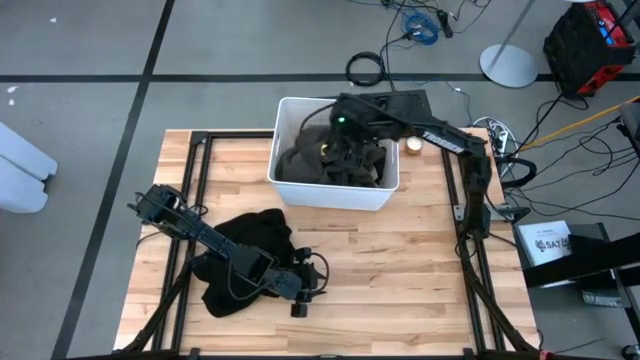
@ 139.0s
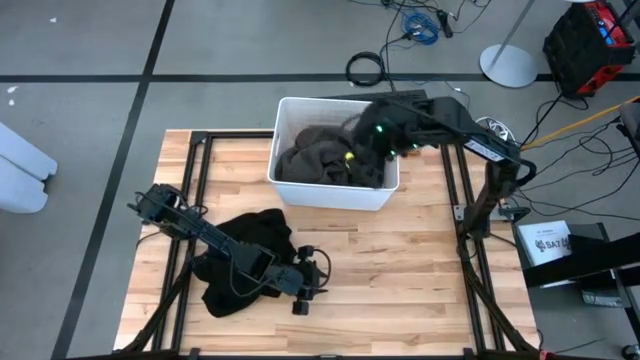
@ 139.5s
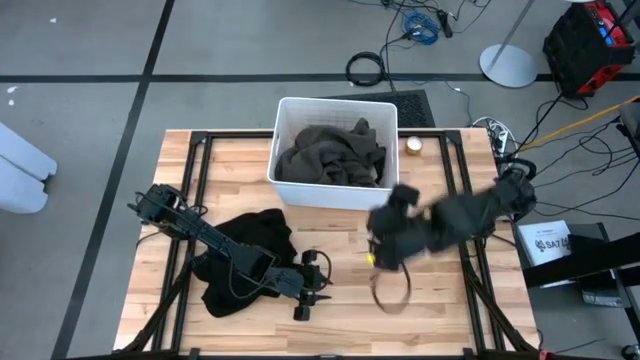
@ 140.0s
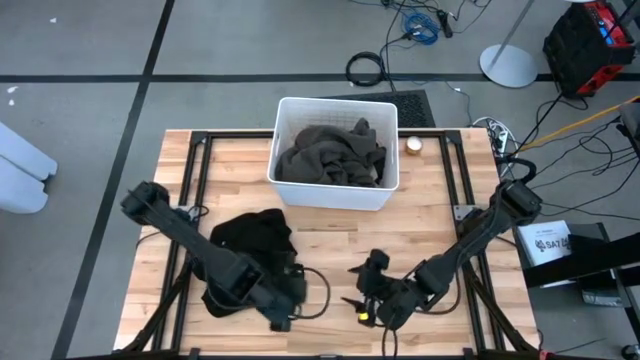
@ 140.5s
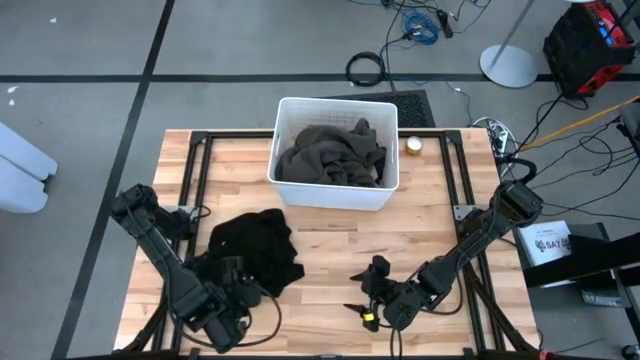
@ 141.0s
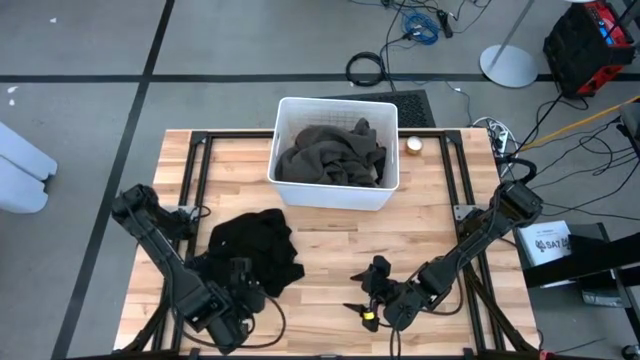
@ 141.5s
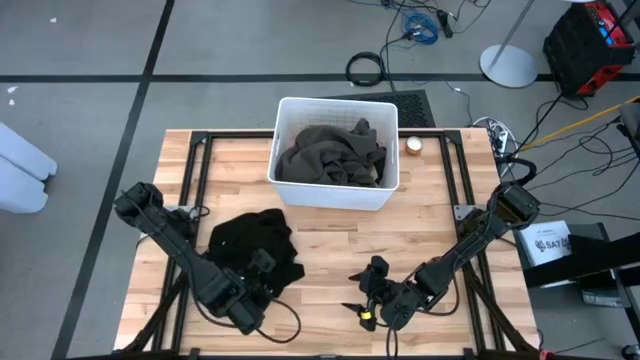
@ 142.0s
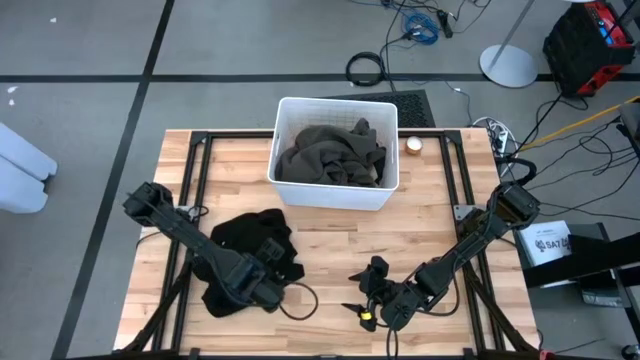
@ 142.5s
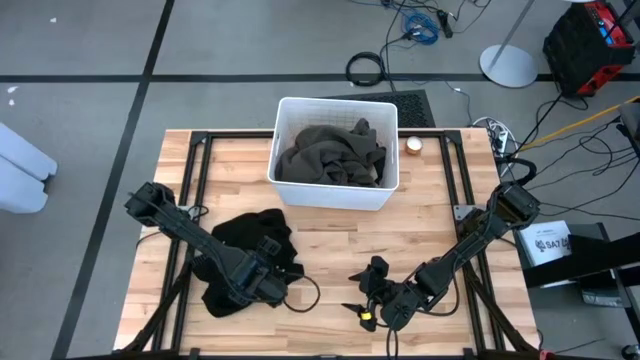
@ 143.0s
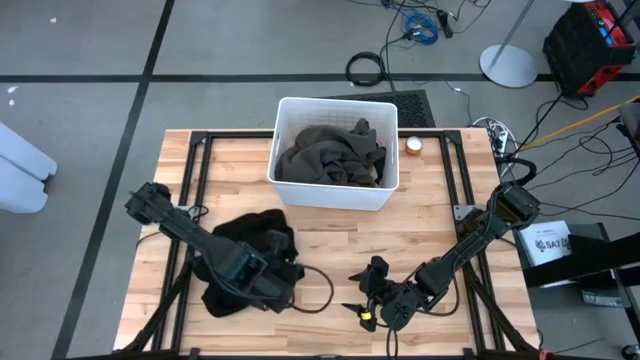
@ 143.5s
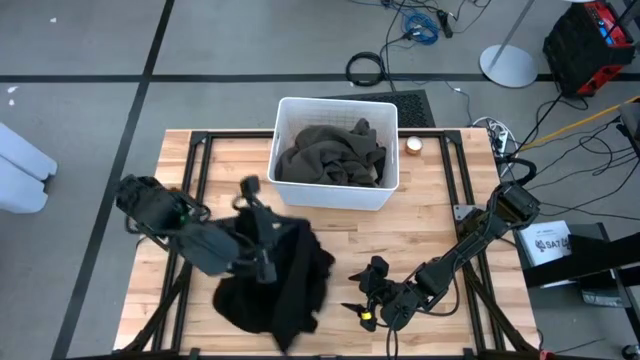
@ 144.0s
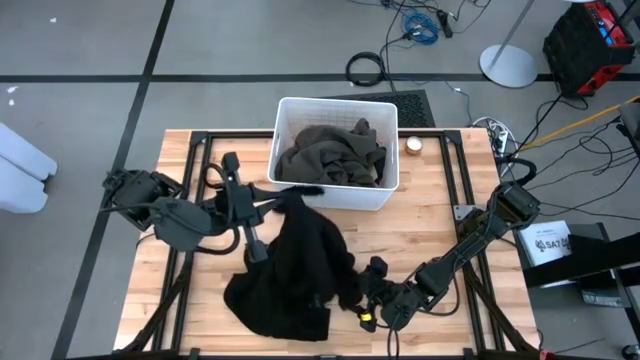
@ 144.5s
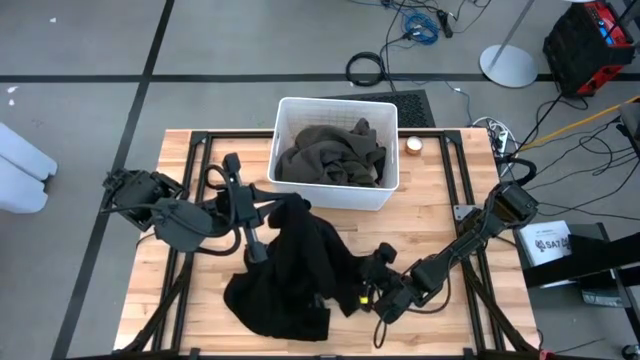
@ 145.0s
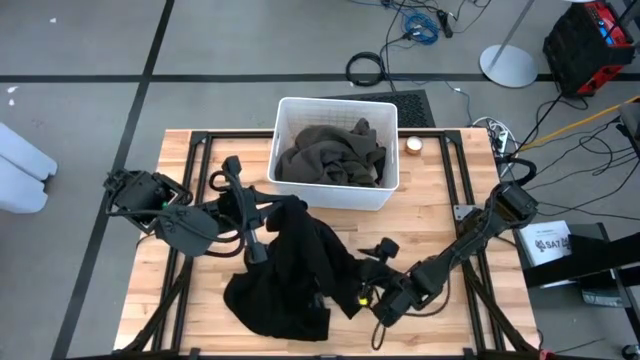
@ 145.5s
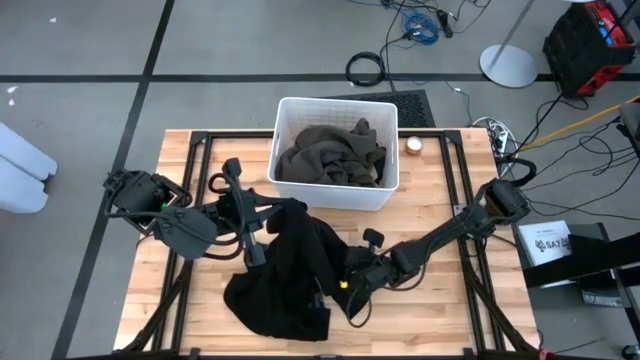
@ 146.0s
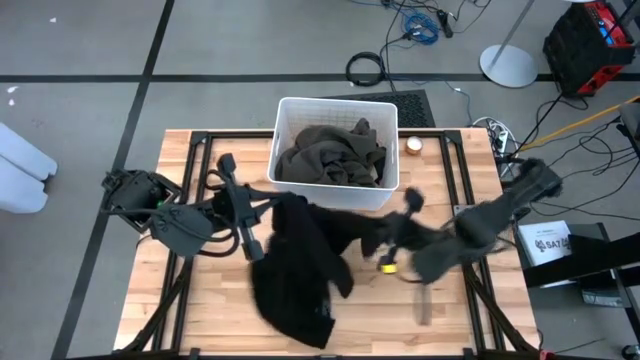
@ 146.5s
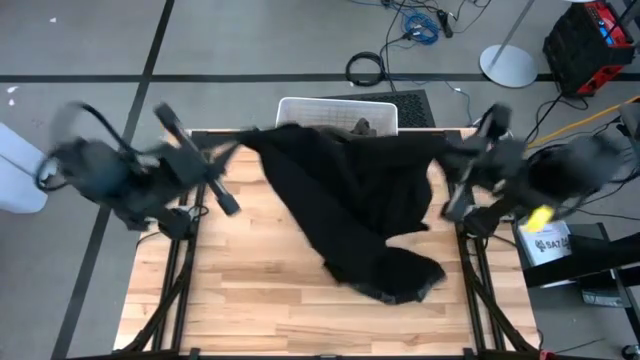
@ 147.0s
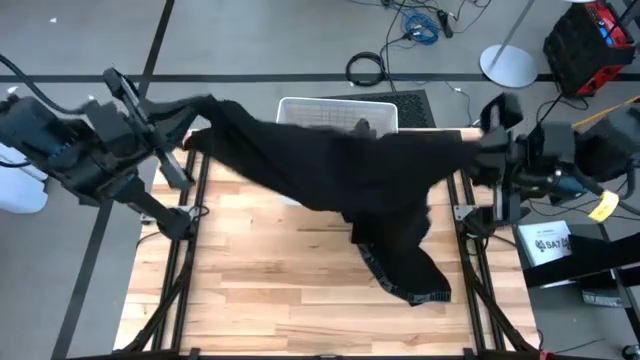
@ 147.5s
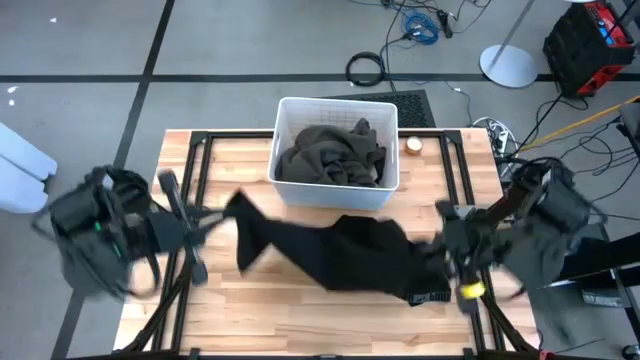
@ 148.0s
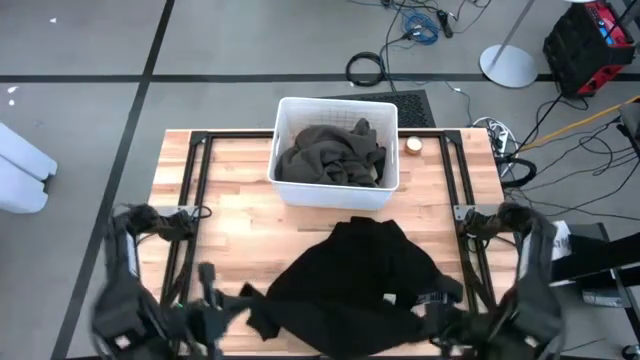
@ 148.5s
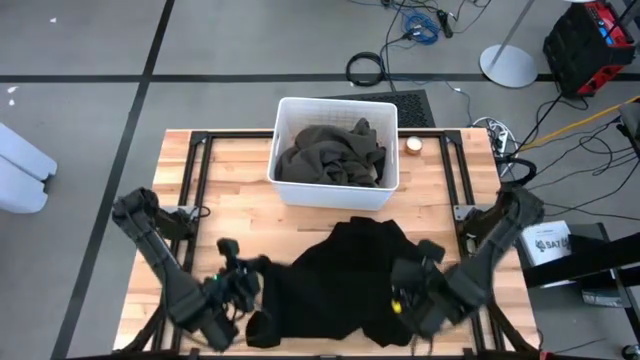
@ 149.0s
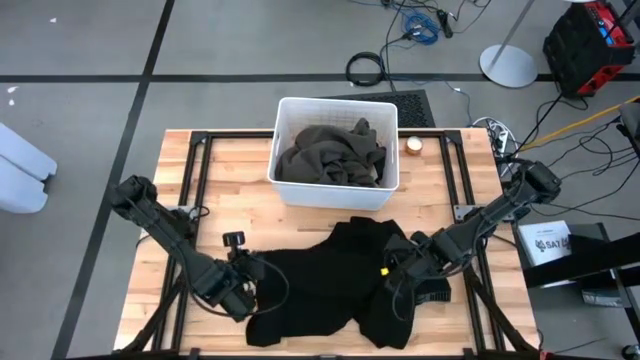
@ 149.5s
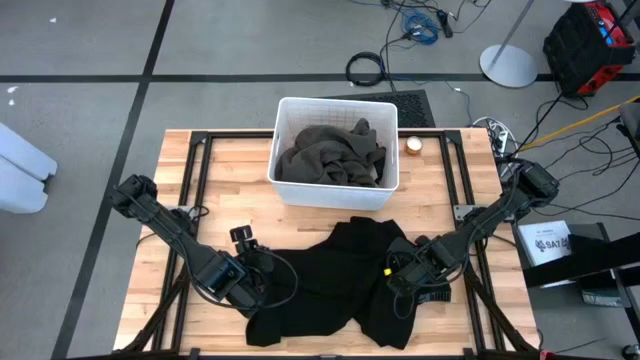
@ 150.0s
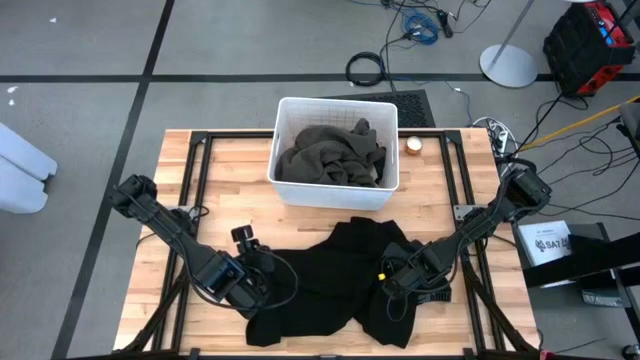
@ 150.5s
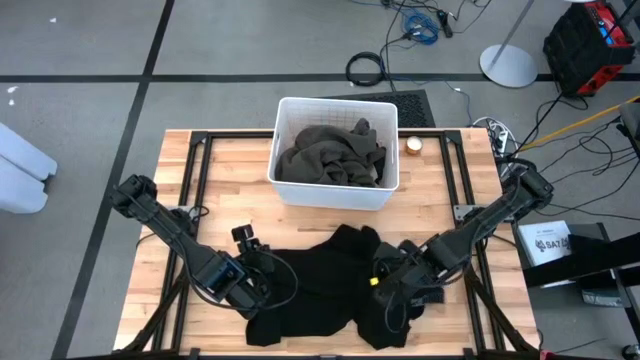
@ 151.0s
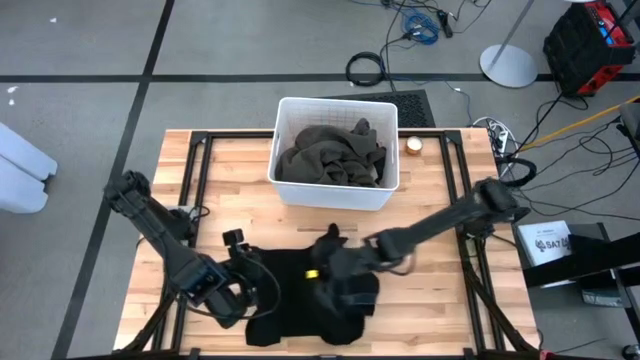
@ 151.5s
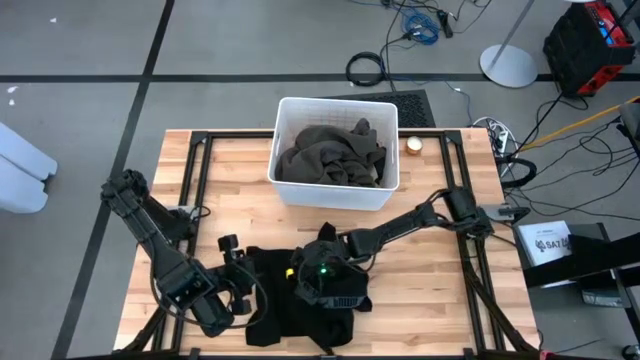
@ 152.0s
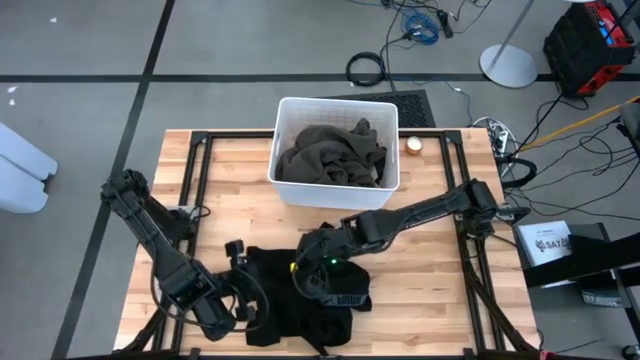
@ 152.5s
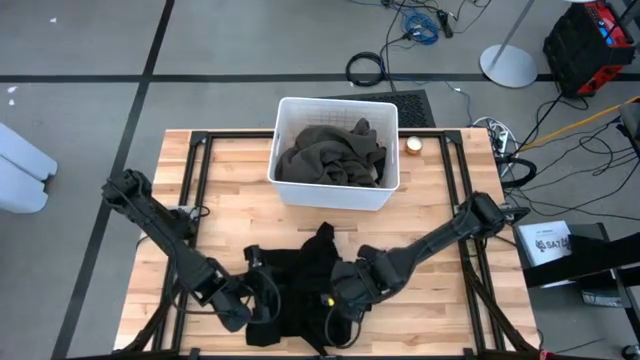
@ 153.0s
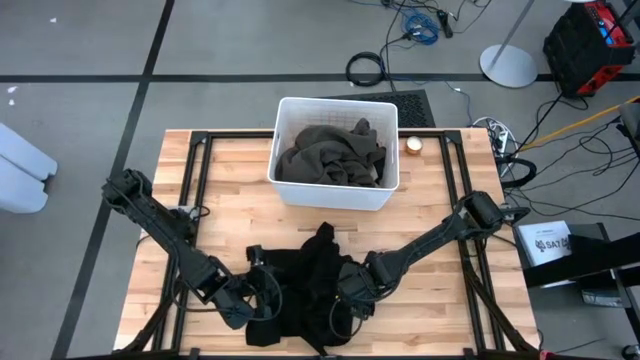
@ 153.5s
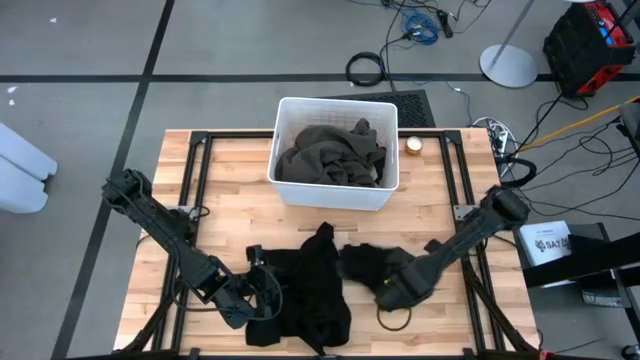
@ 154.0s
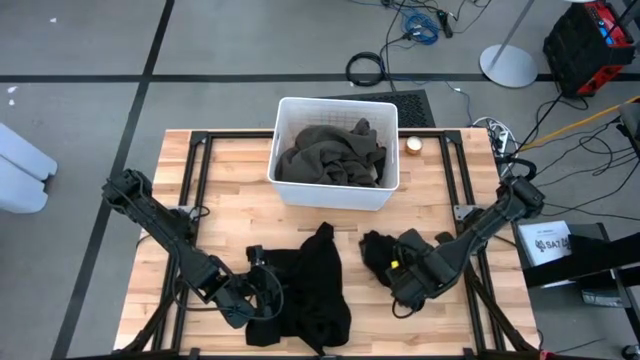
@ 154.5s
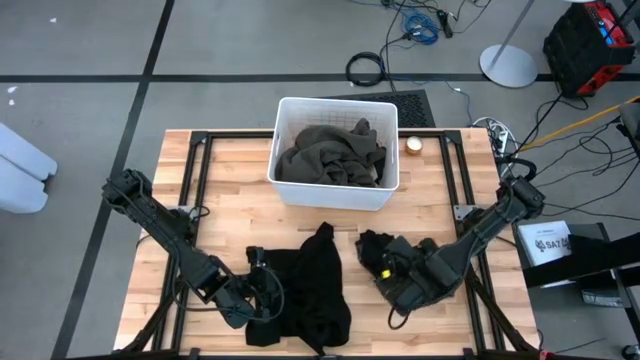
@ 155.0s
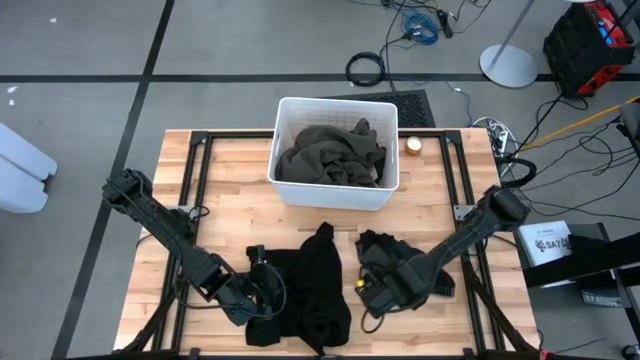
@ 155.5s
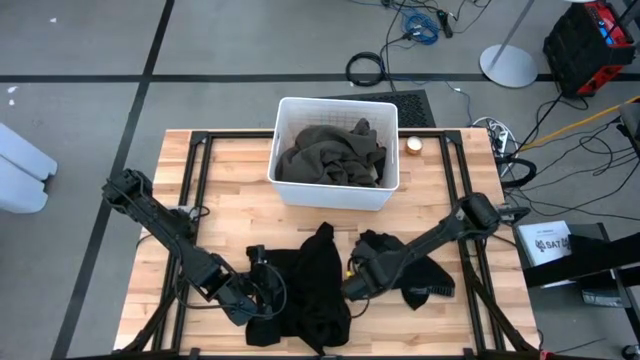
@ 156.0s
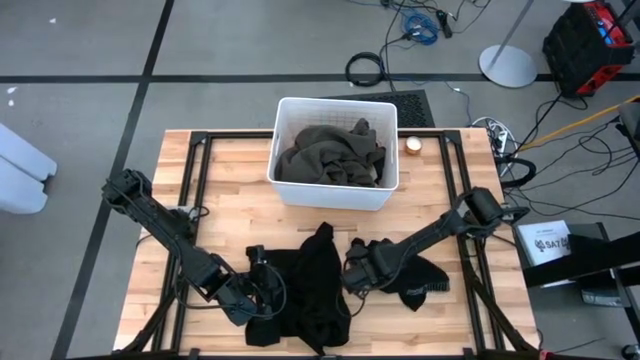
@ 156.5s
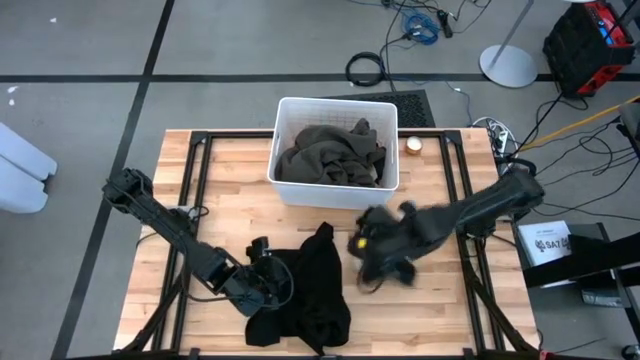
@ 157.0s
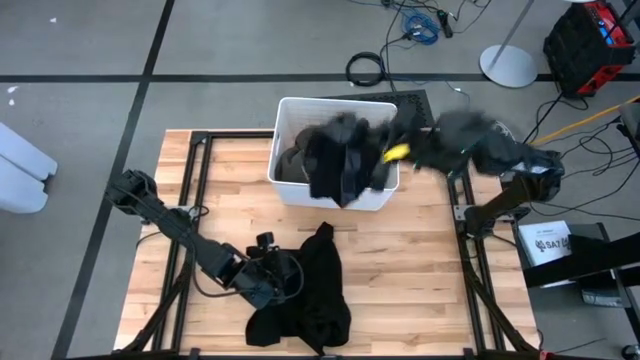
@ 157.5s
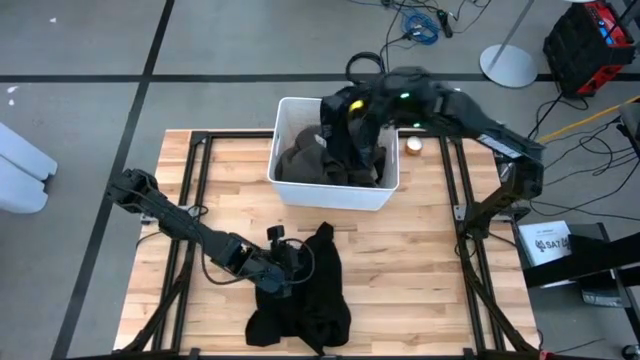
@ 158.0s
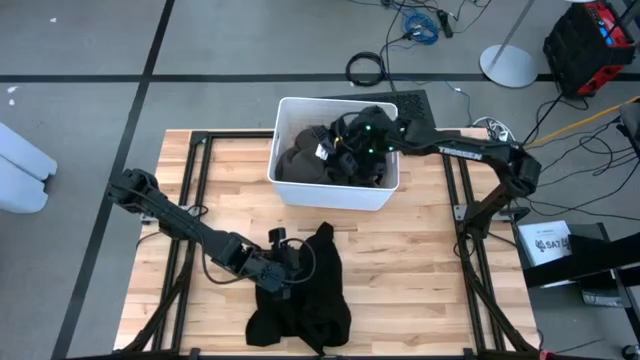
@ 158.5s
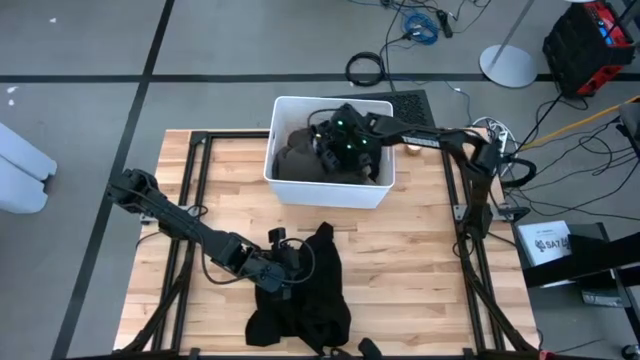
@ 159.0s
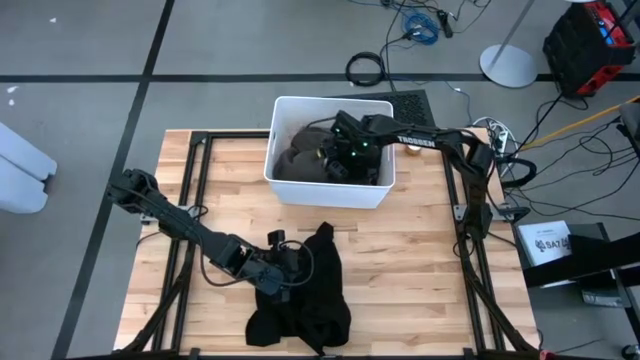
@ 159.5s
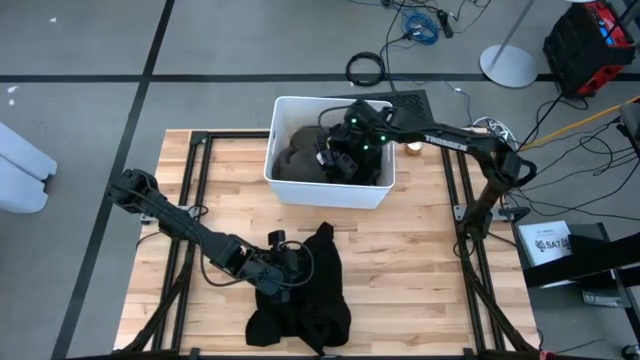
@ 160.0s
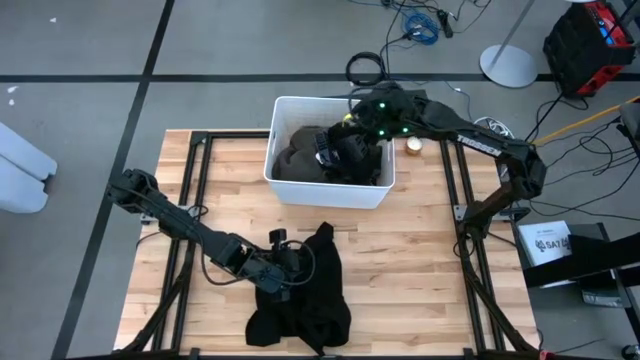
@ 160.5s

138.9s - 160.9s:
Task: Sort clothes
Put the black boxer into the white laundry bin
